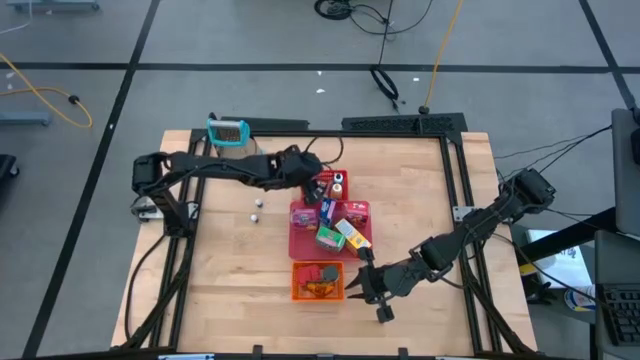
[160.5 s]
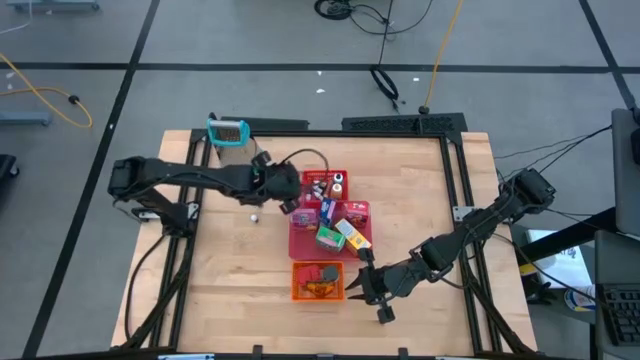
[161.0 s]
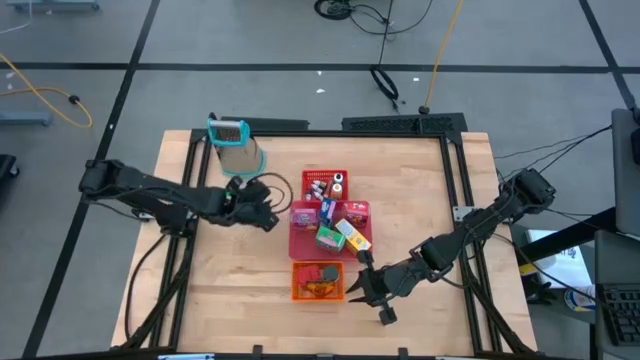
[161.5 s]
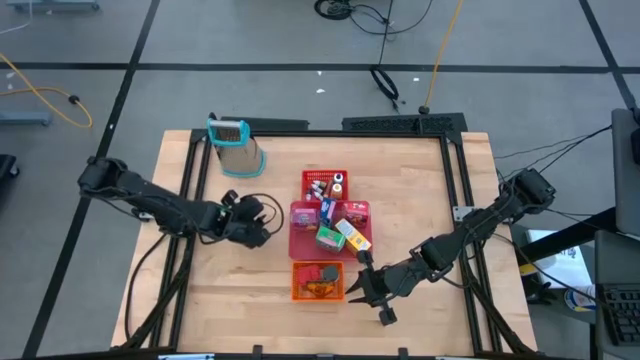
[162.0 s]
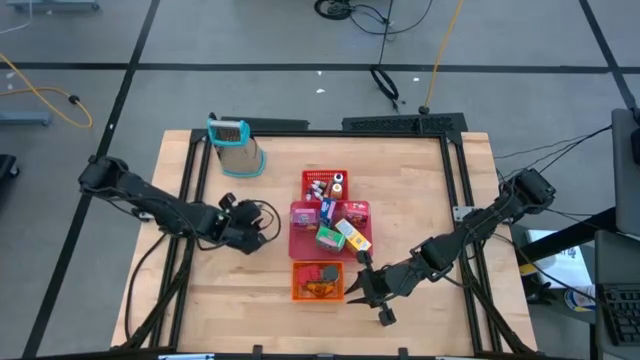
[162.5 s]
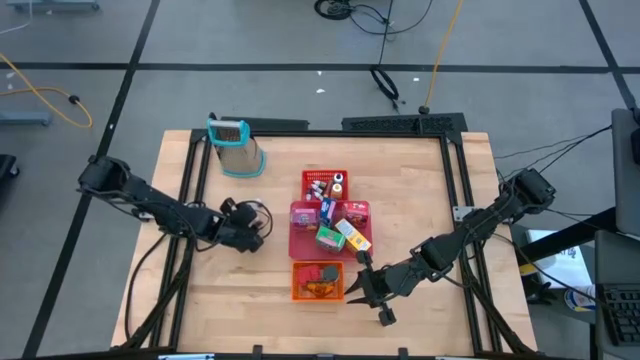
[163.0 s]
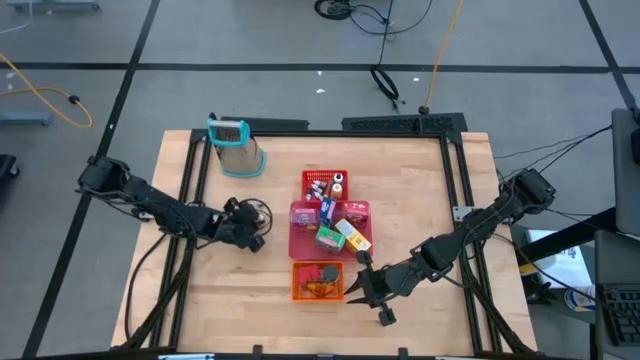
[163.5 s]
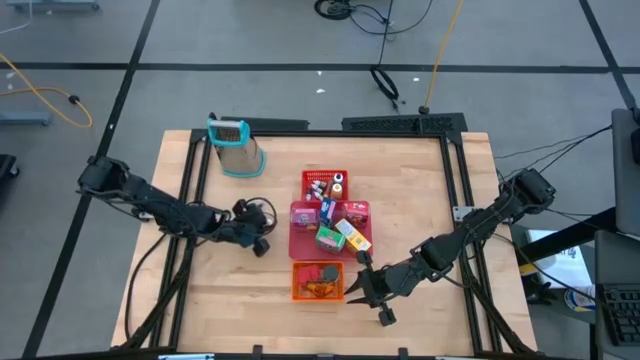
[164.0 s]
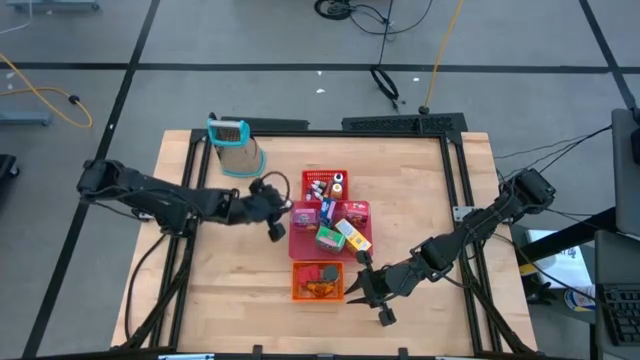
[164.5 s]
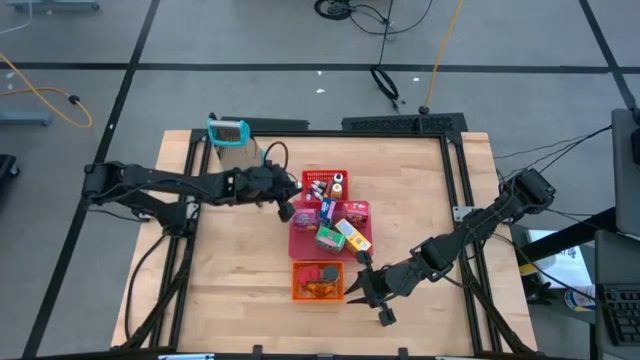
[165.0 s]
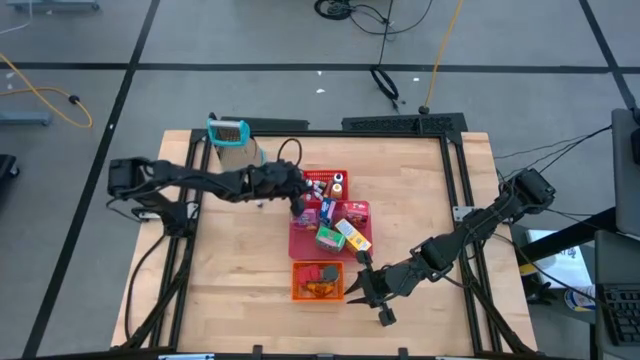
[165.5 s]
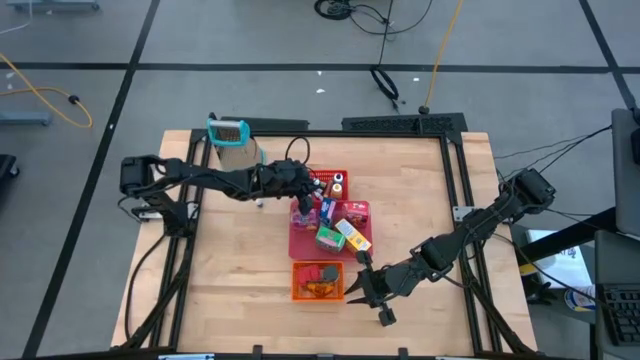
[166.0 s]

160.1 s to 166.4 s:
Task: Pick & Place Kitchen Items
Put the bottom small black food coloring bottle into the red bin

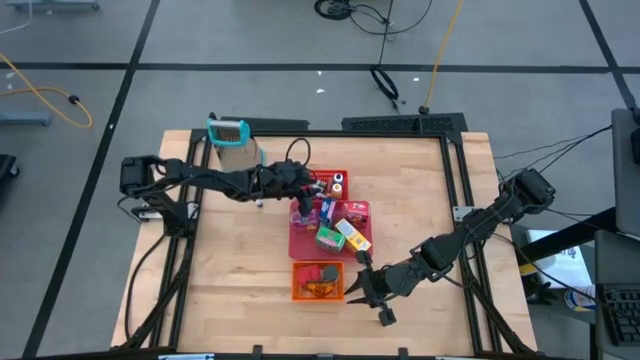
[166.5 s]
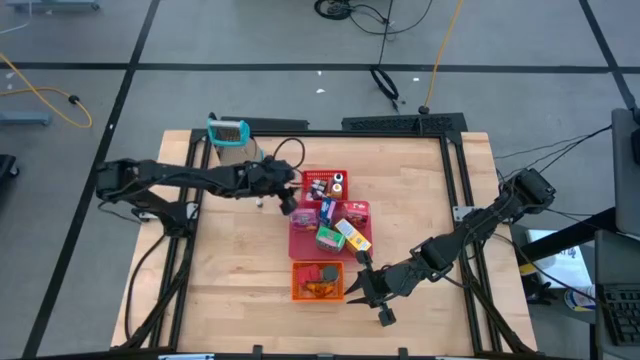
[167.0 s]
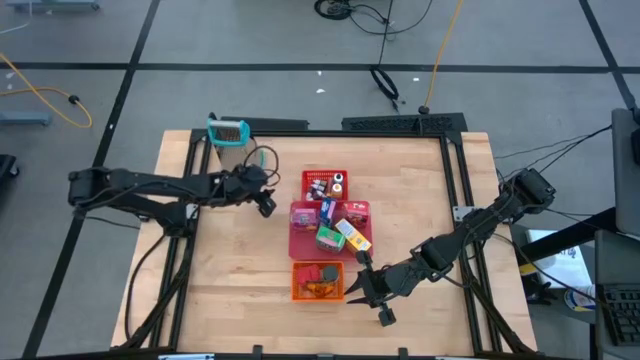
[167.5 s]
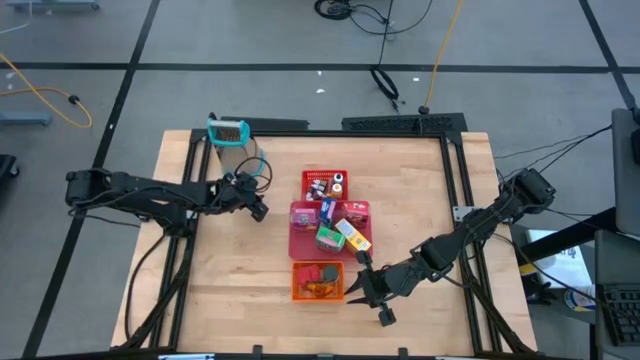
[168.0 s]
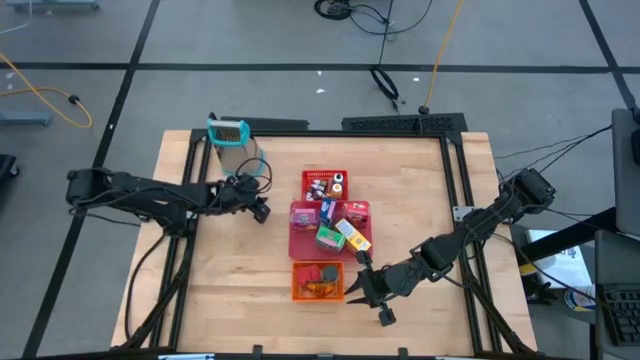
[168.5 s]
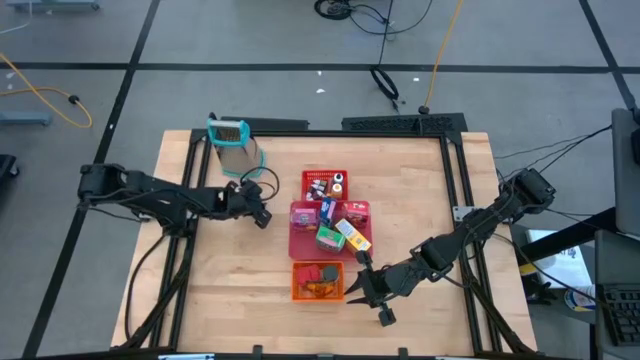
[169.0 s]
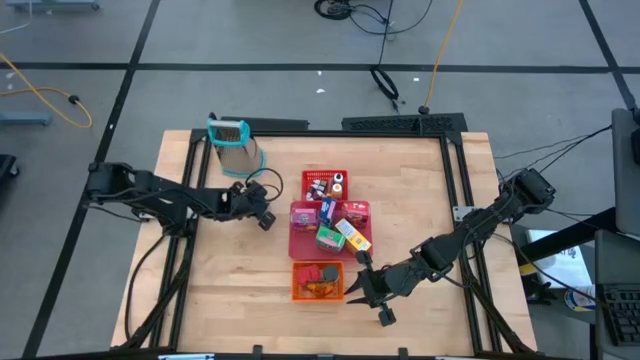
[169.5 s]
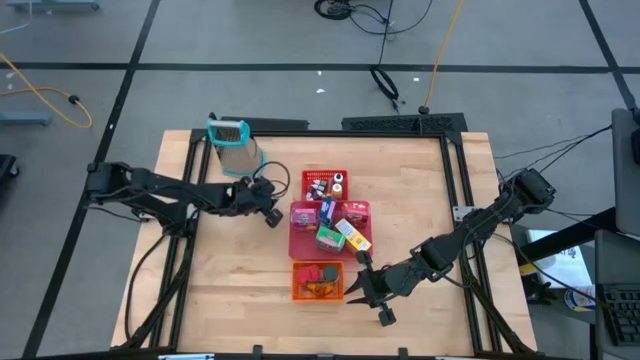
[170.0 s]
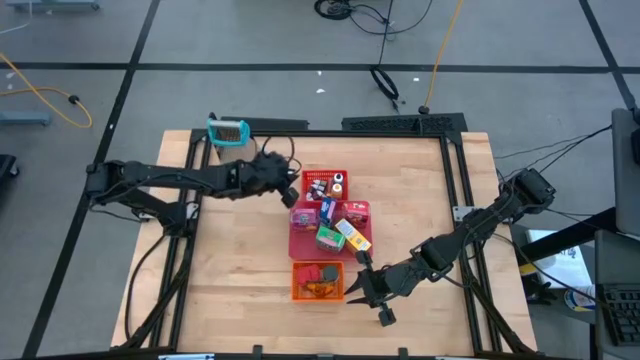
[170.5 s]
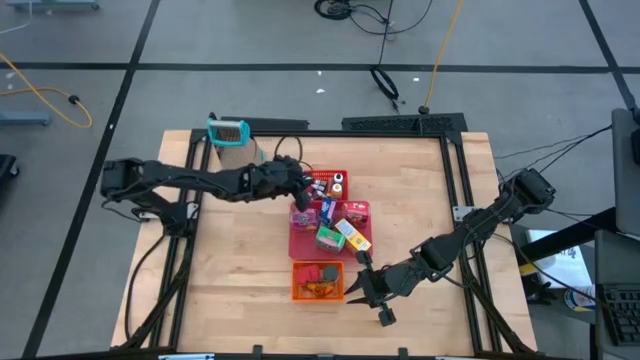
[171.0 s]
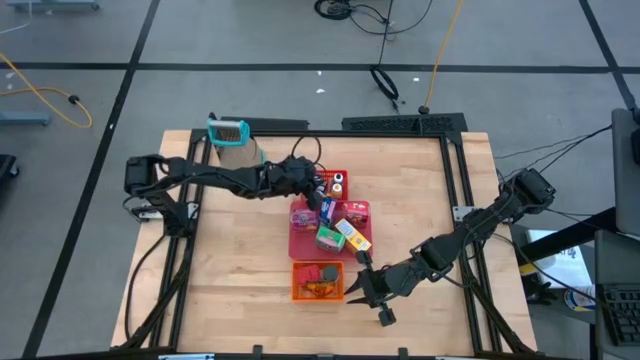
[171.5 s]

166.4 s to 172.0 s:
Put the small black food coloring bottle into the red bin

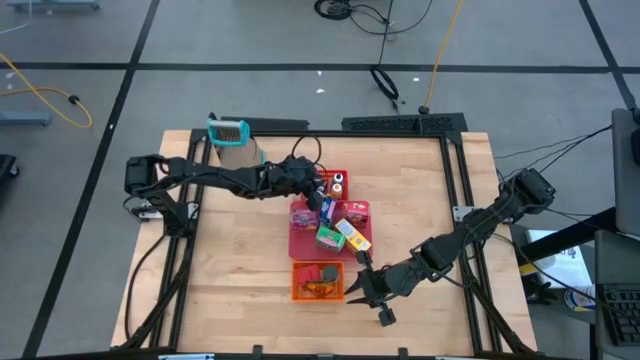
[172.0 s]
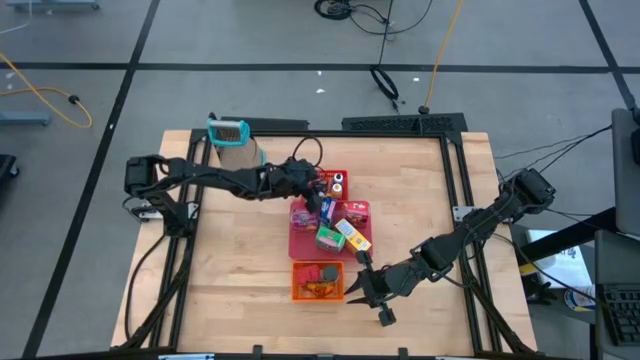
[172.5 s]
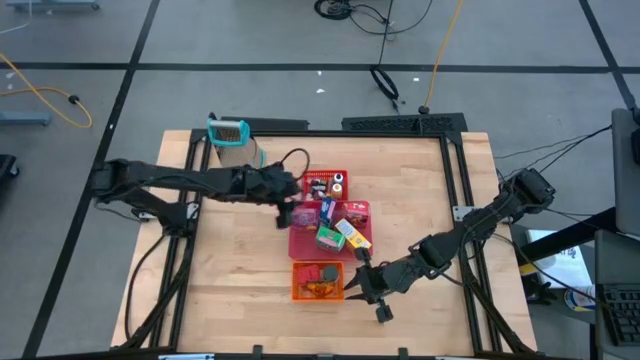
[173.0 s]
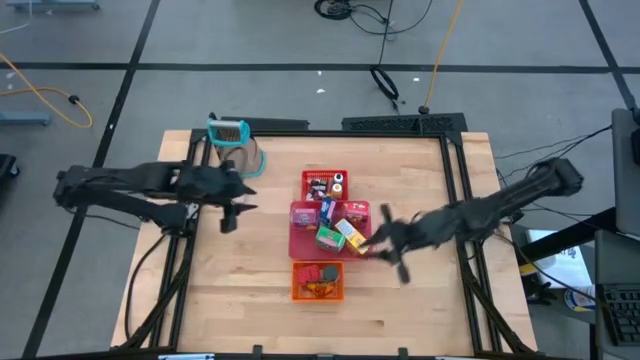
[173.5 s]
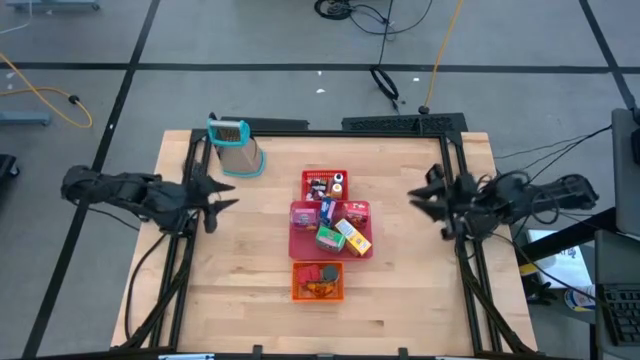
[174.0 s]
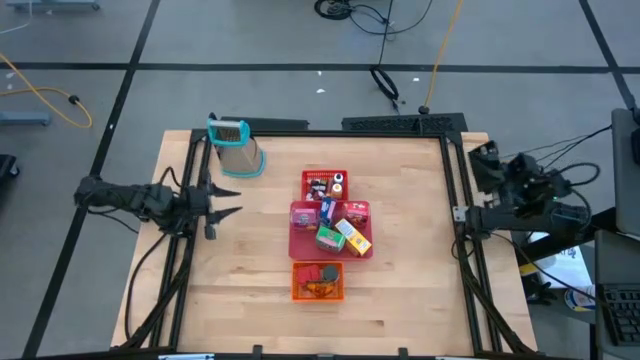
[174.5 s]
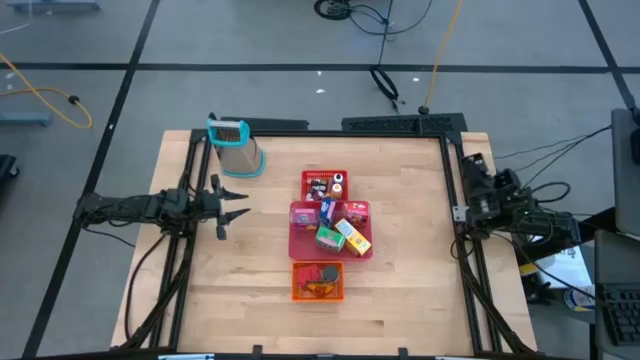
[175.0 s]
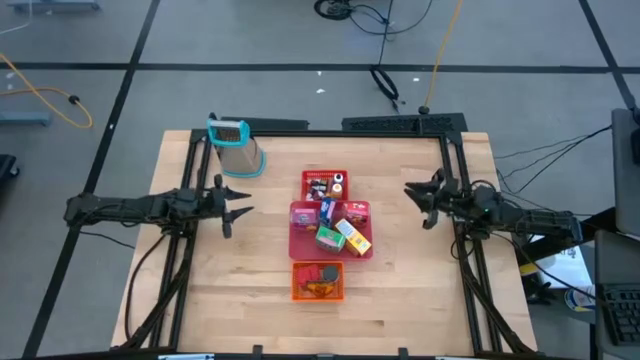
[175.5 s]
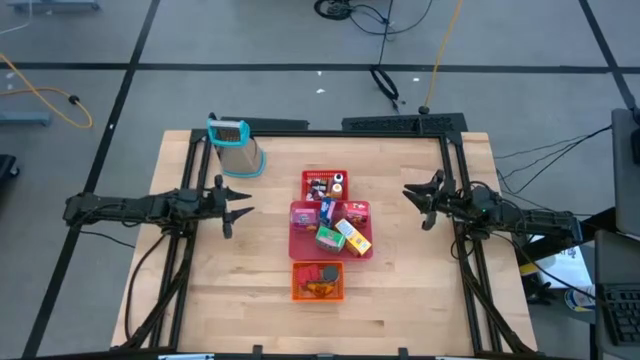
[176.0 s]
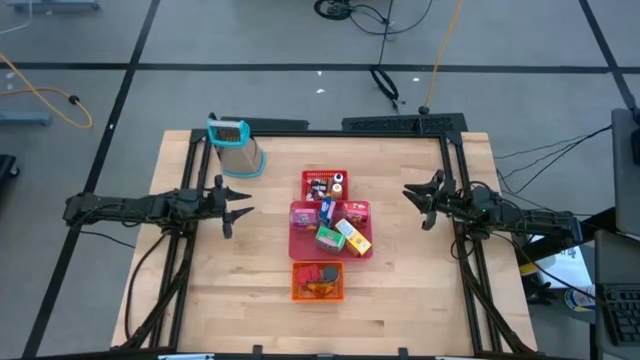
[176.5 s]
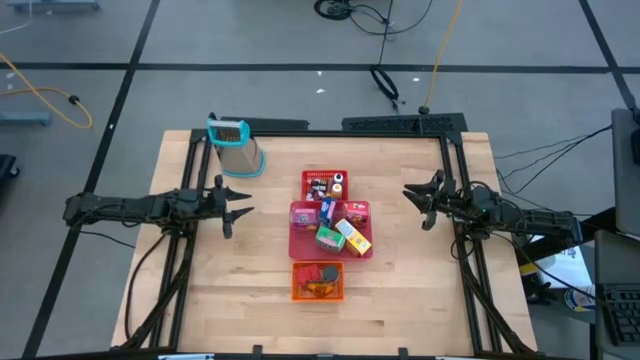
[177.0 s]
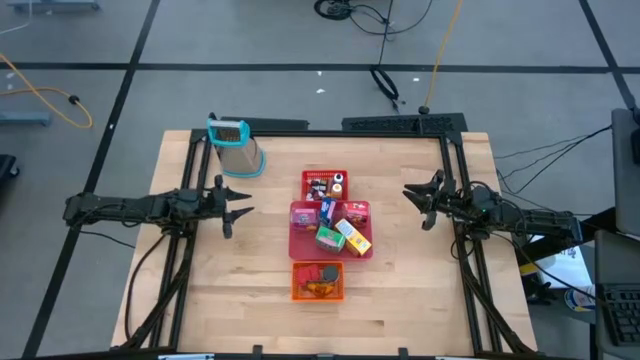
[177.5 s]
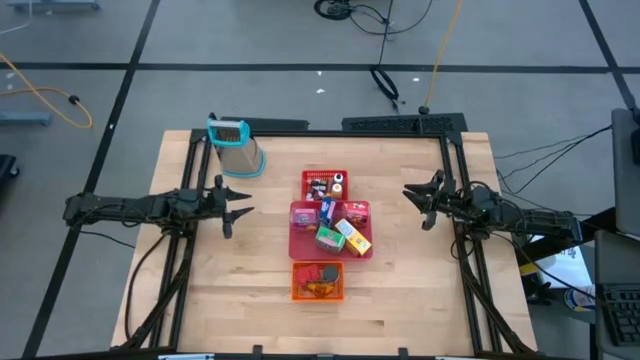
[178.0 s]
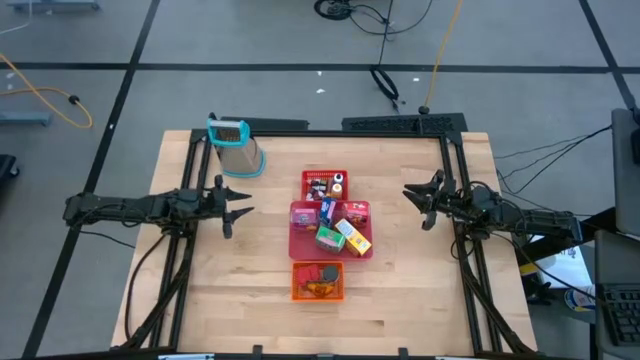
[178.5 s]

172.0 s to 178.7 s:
Return to Home Position

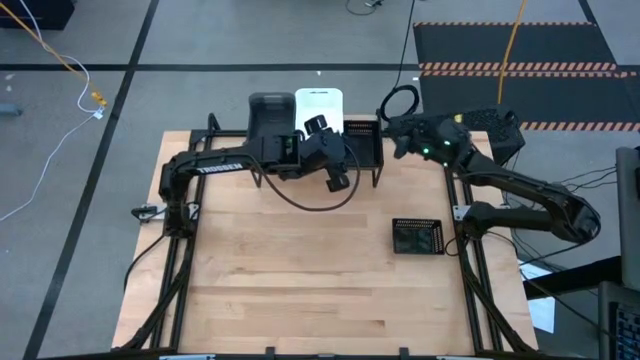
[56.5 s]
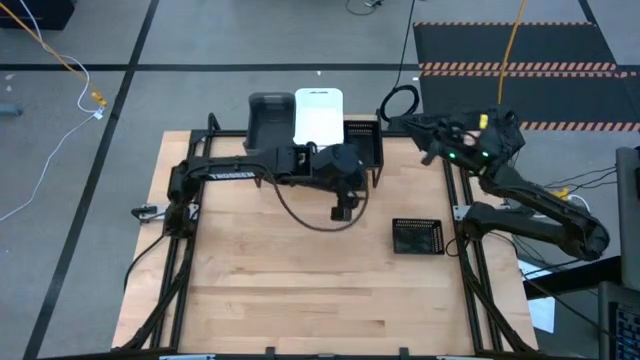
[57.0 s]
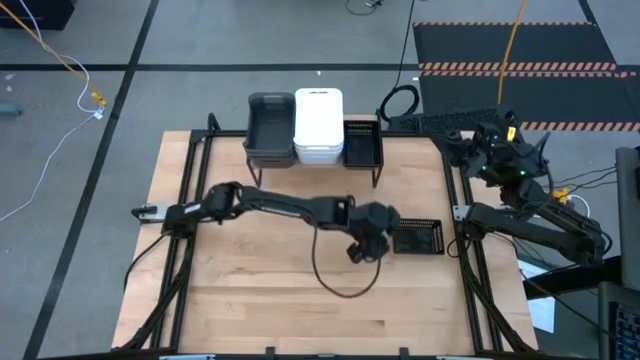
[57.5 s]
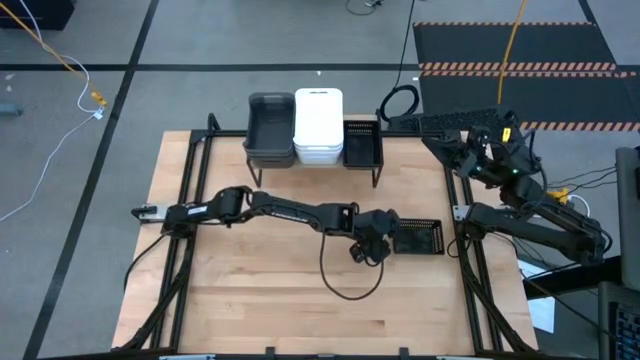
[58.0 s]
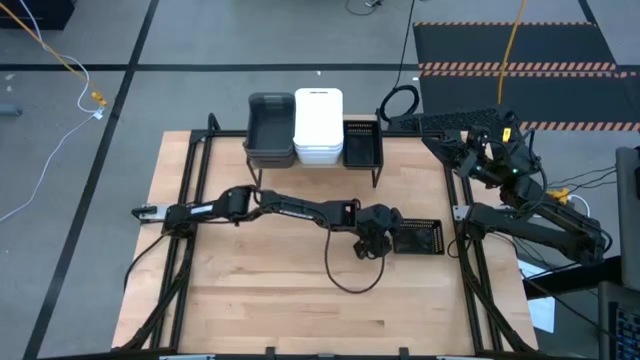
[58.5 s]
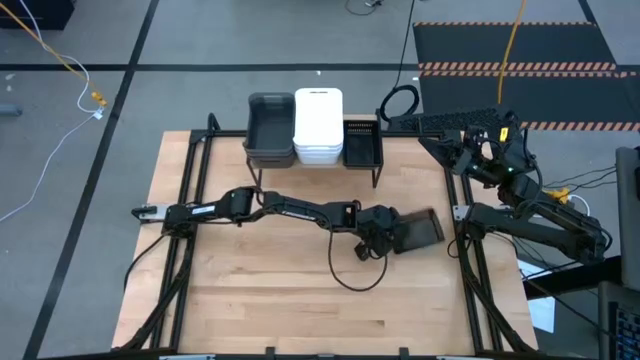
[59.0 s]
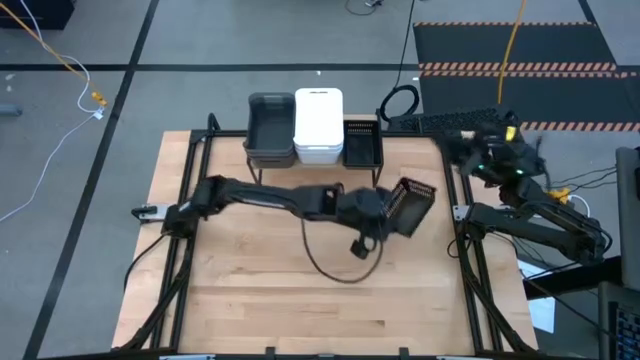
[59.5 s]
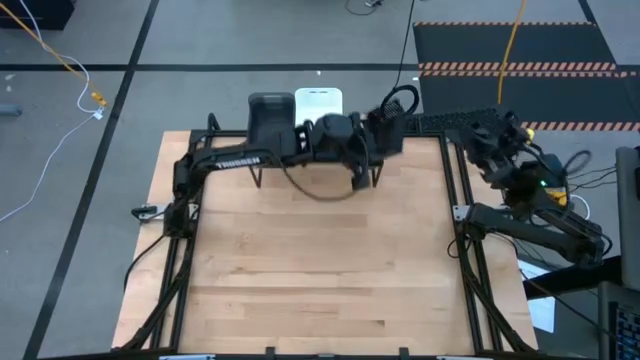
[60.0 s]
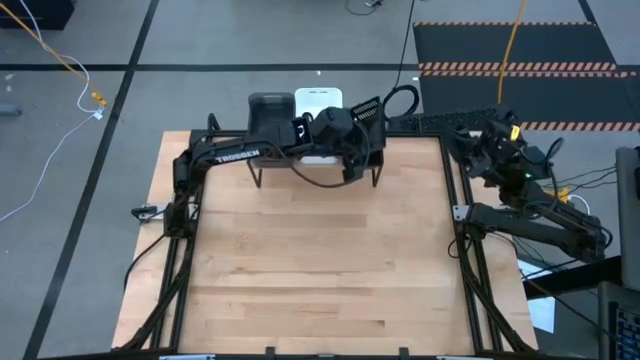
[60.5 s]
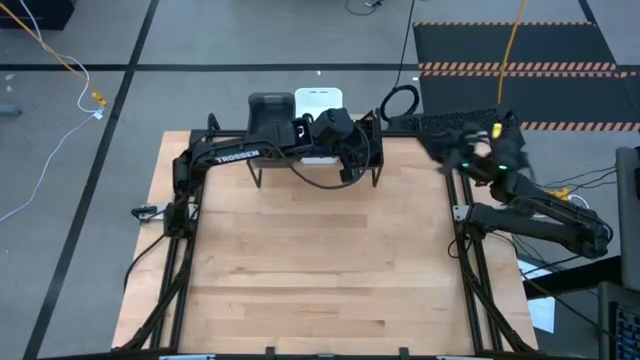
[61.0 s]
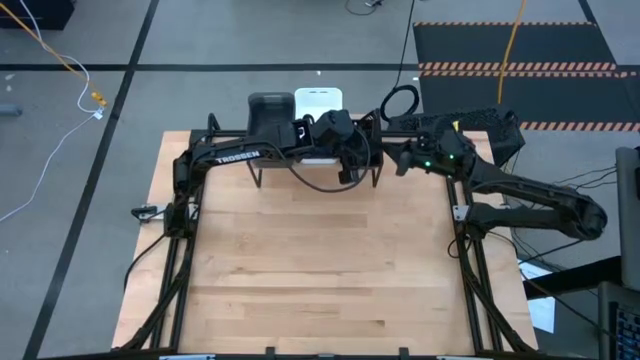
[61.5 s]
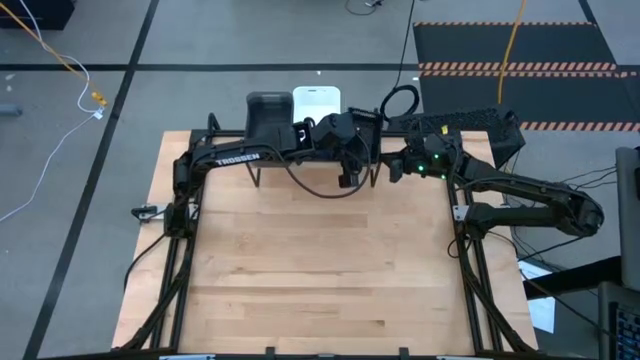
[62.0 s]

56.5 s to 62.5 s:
Task: Stack baskets on shelf by color
Stack the black bin on the stacked black bins on the shelf
